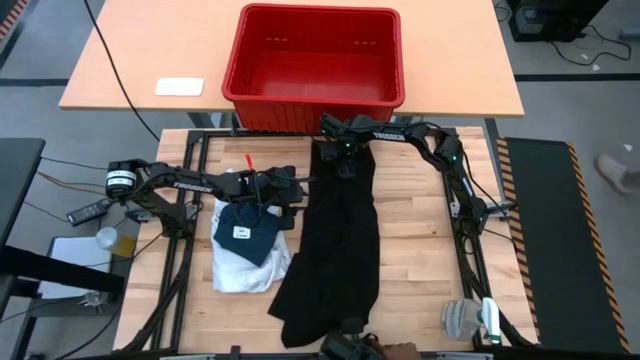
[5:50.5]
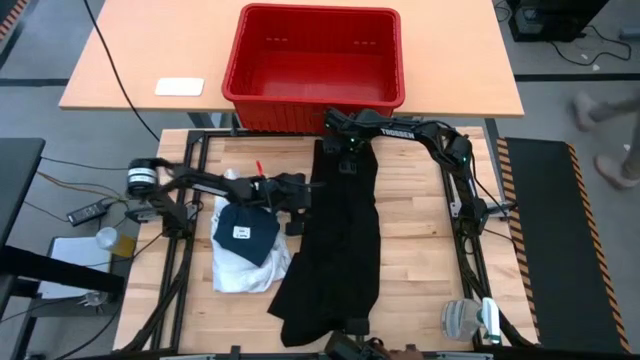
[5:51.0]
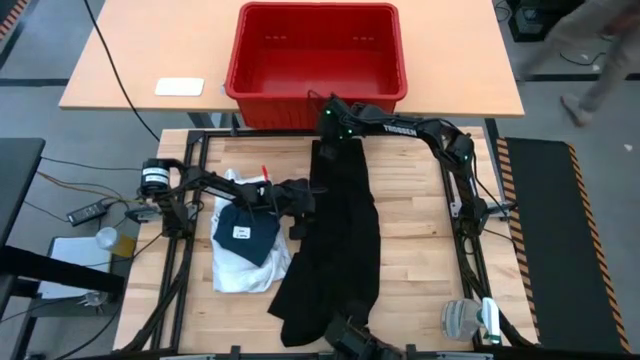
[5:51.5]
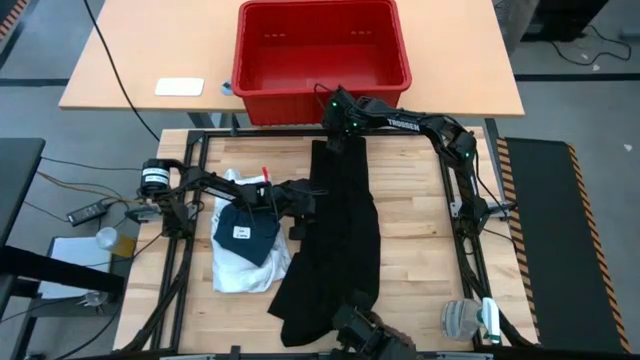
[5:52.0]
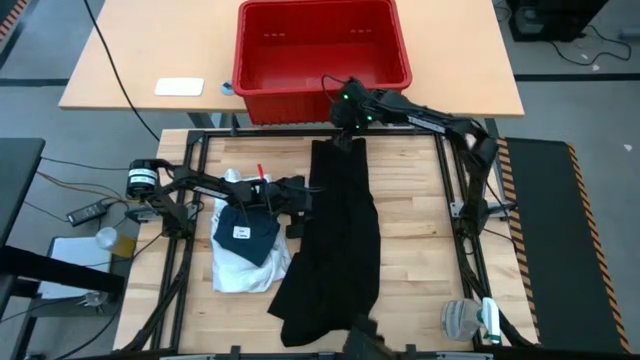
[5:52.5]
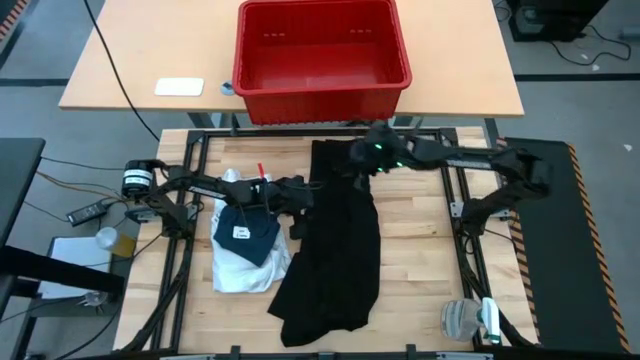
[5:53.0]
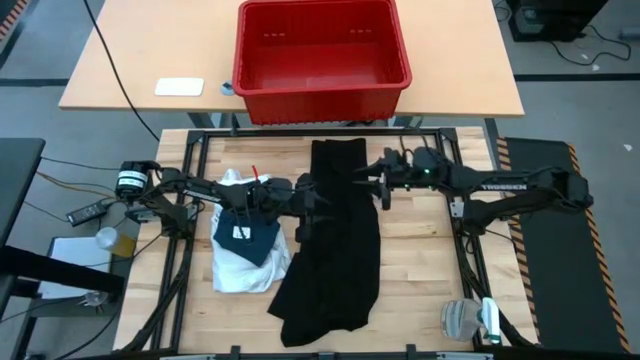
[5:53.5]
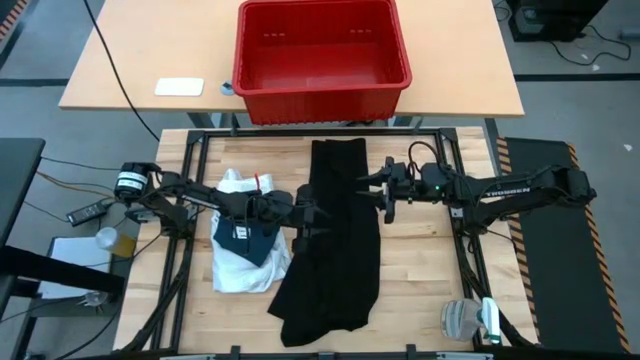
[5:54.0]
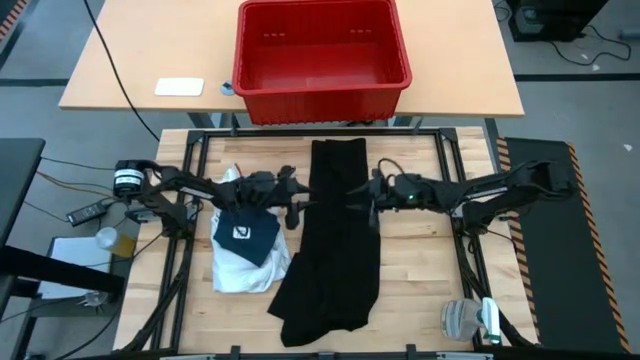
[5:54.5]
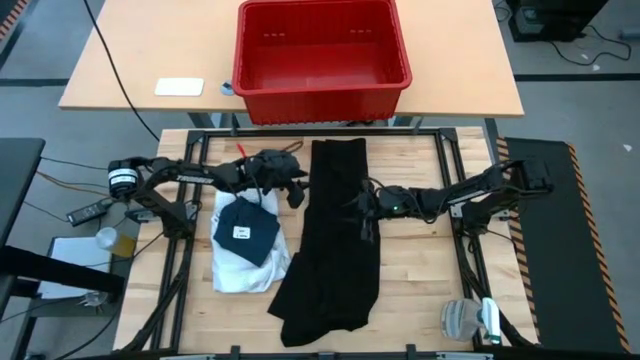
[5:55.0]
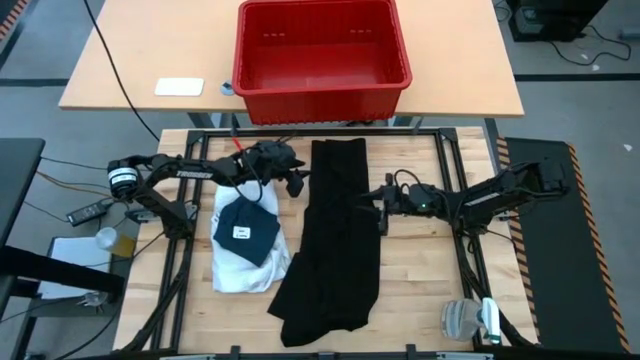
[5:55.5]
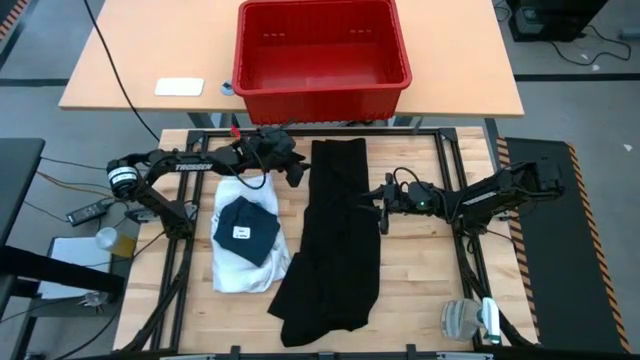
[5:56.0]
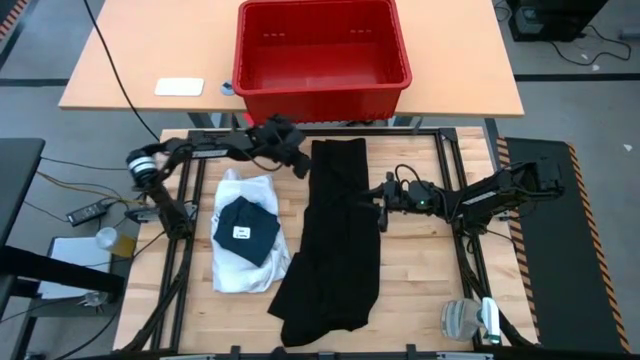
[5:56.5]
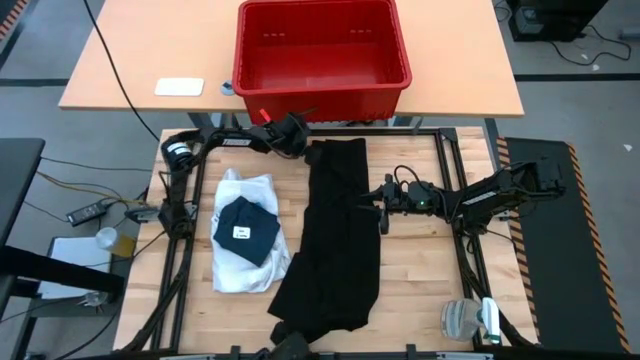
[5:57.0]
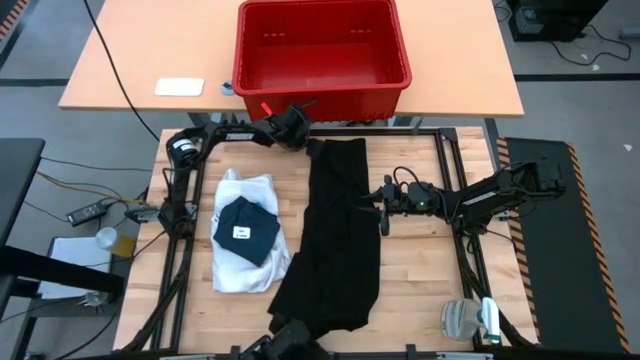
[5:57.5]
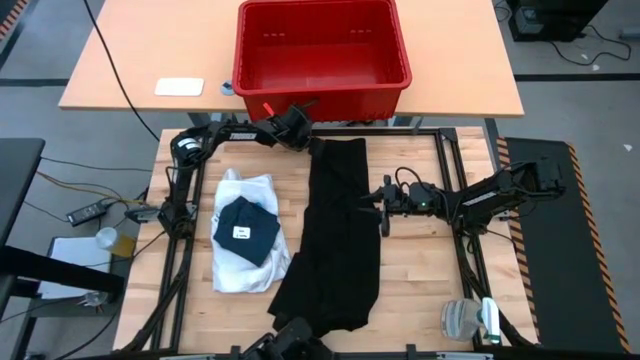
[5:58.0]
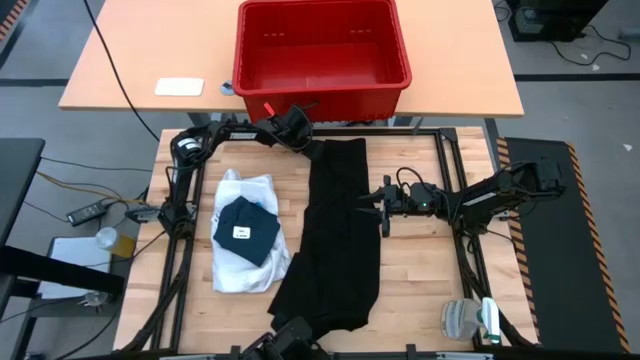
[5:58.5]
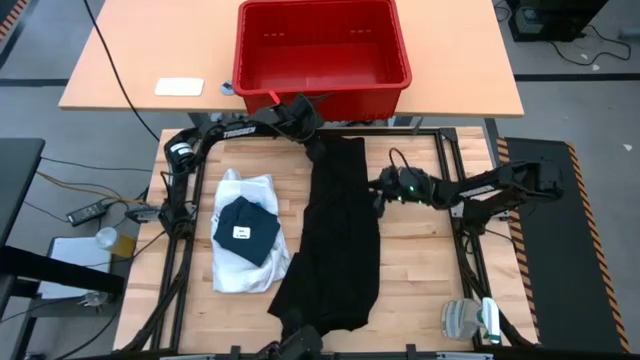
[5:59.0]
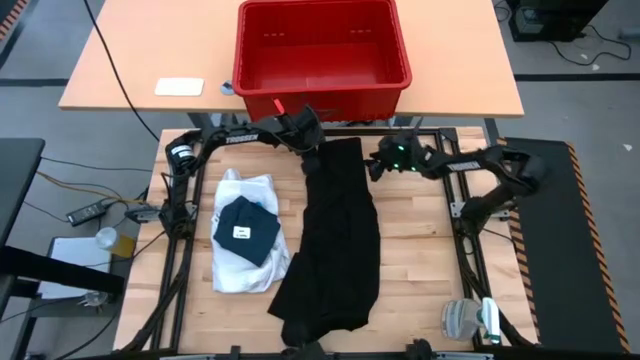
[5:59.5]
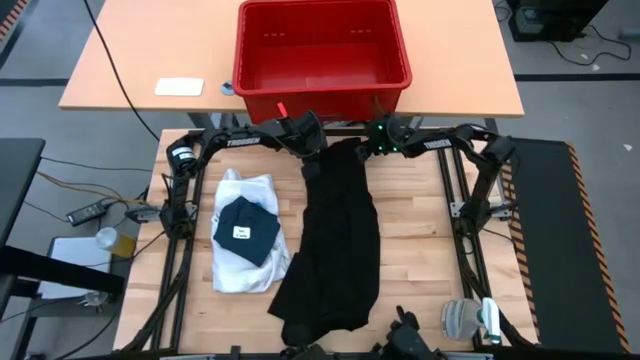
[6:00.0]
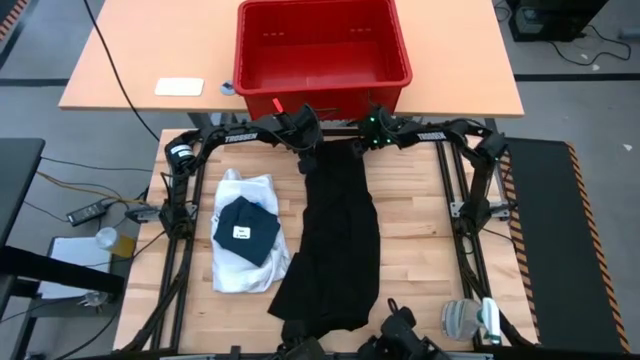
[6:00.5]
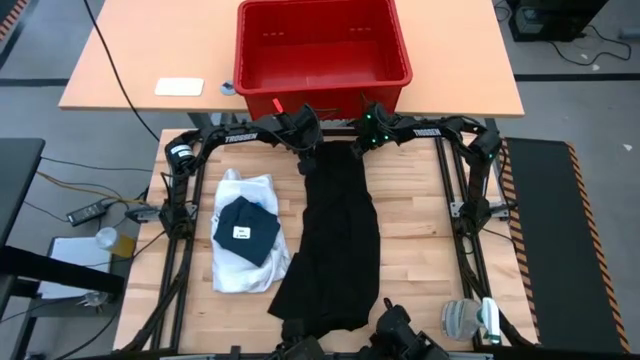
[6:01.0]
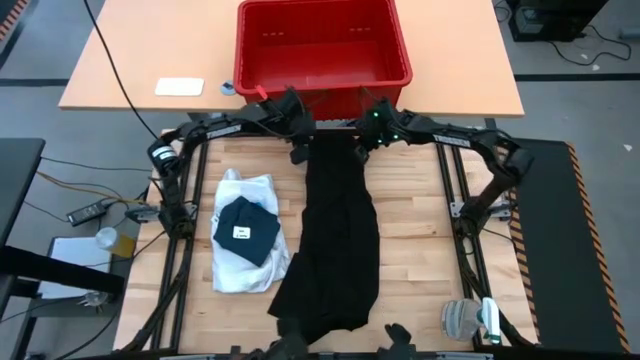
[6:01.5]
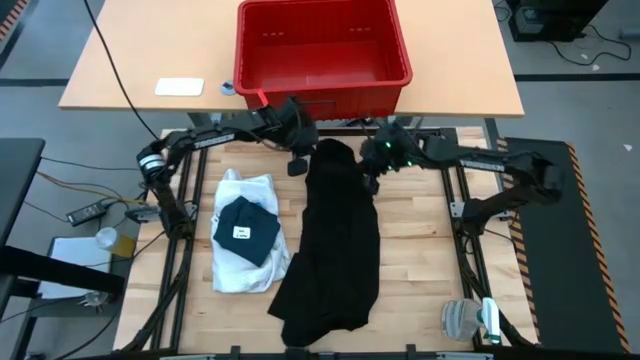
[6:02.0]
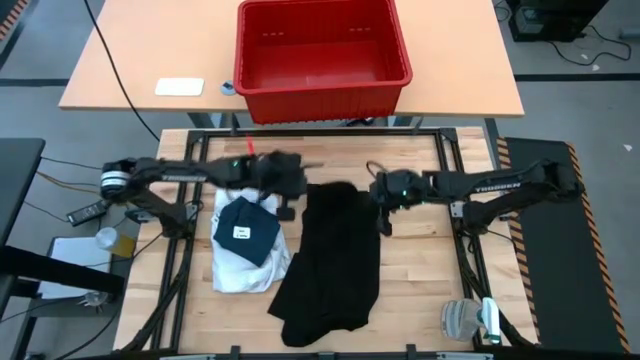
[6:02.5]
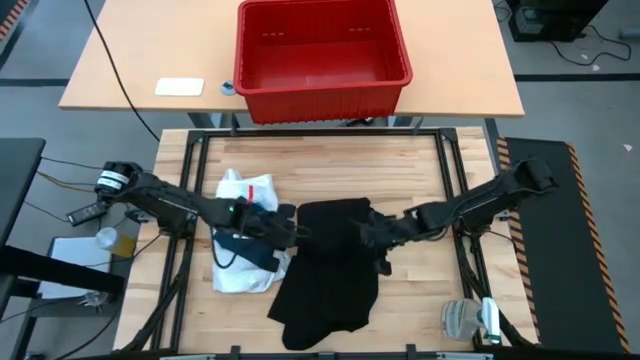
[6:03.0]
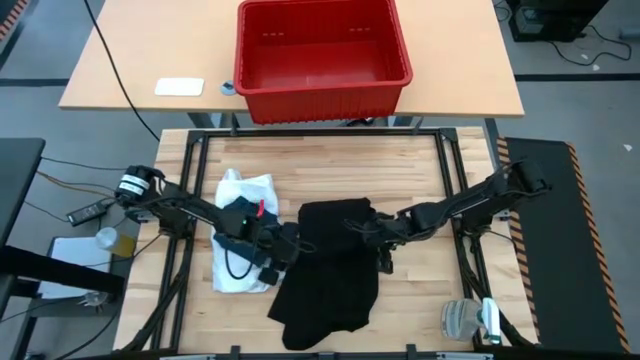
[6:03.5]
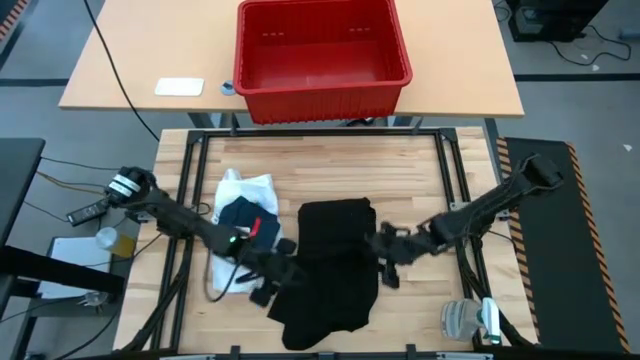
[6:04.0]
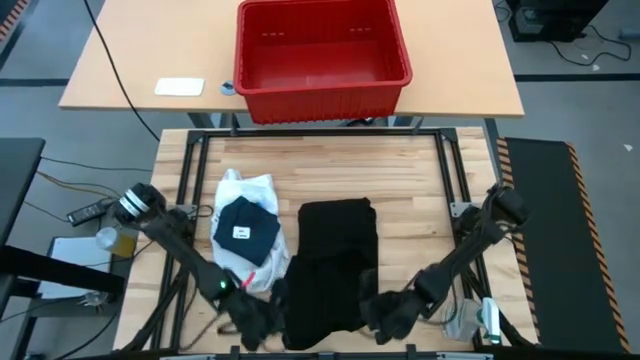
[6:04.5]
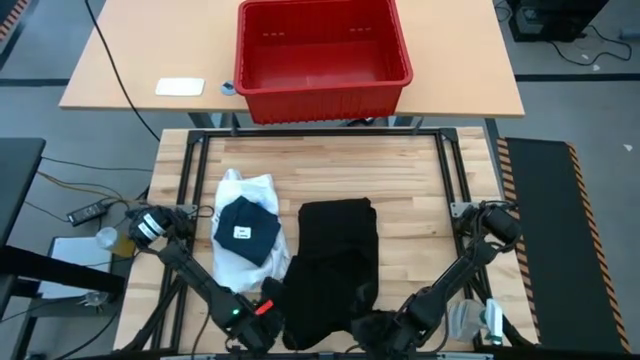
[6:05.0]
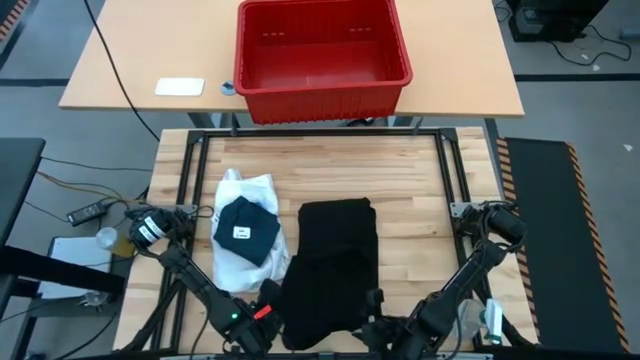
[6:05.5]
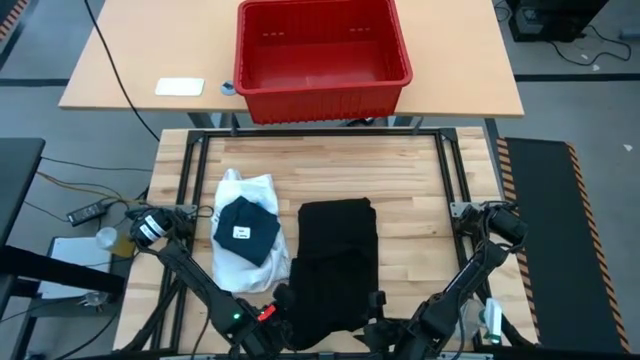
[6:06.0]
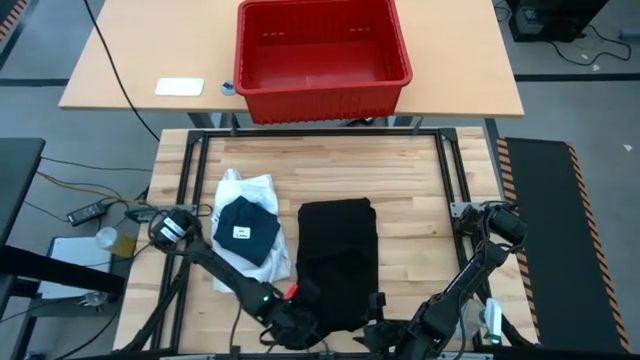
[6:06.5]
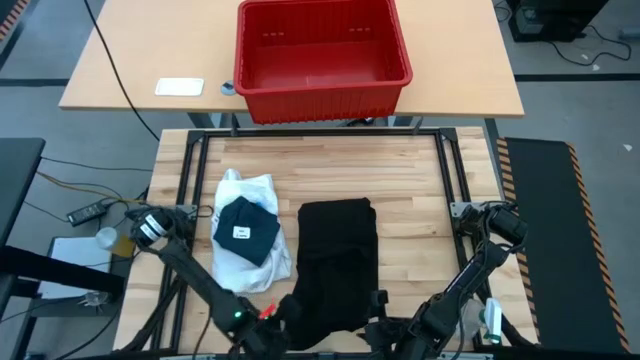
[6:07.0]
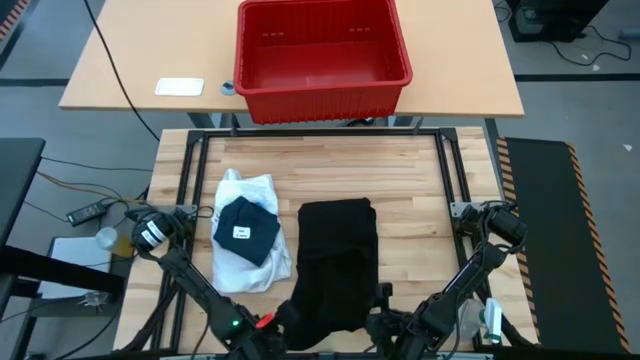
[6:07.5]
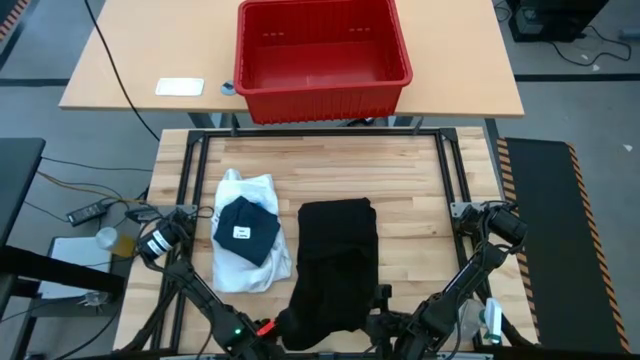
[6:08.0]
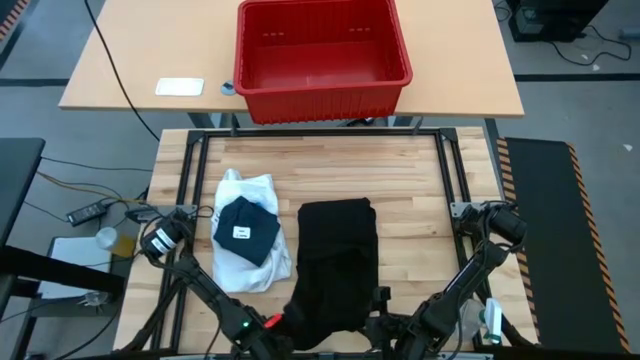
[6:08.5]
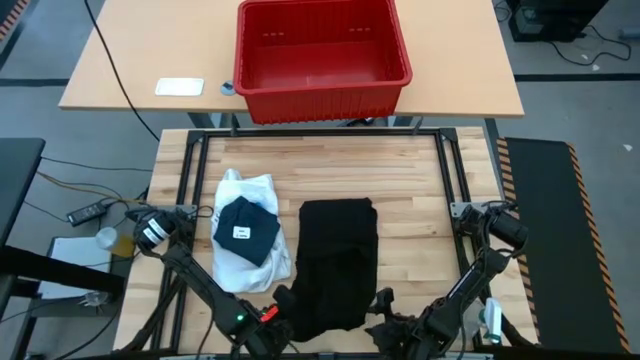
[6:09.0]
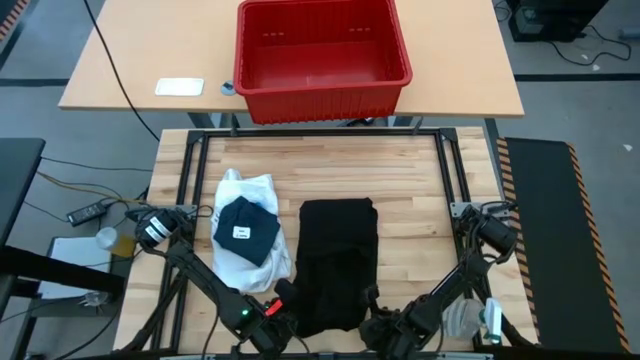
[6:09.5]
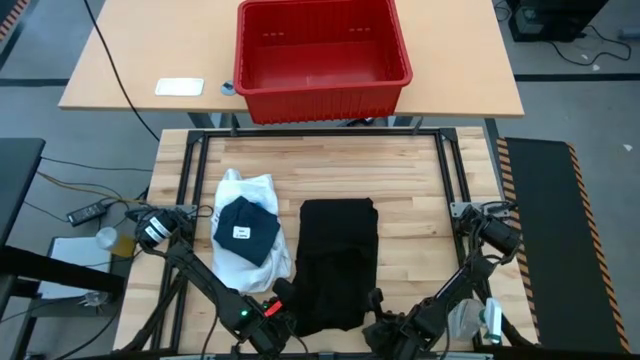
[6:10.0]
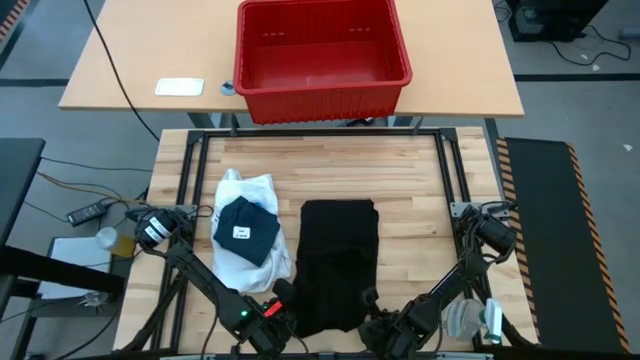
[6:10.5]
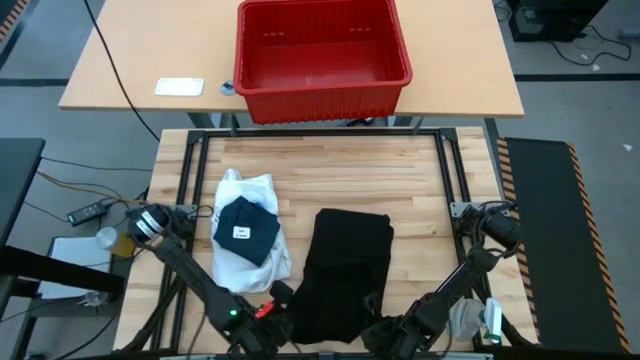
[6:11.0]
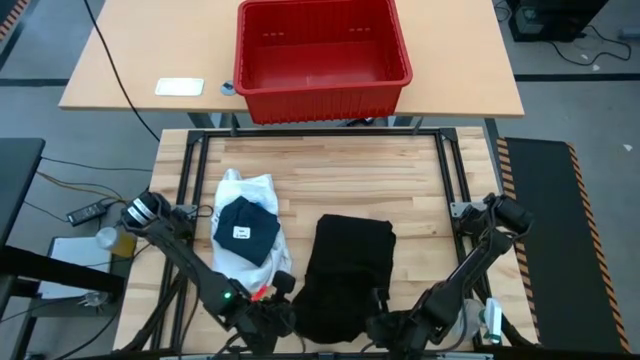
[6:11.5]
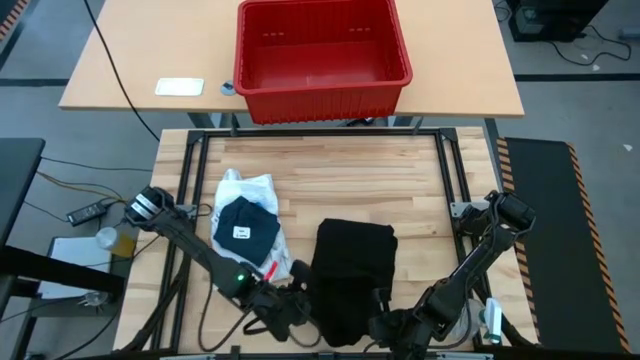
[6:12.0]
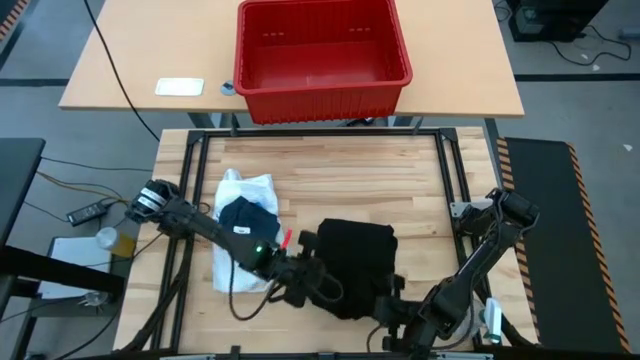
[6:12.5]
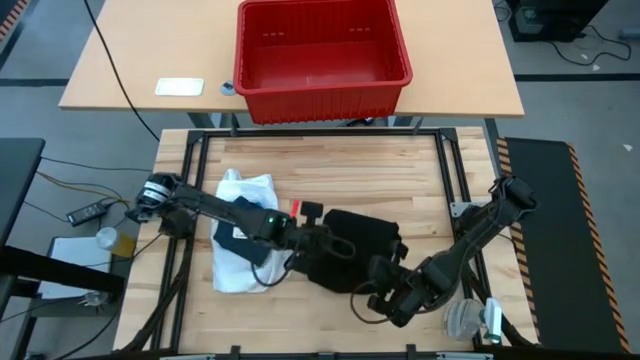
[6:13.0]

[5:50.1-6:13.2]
Task: Fold laundry
Fold the black shirt
